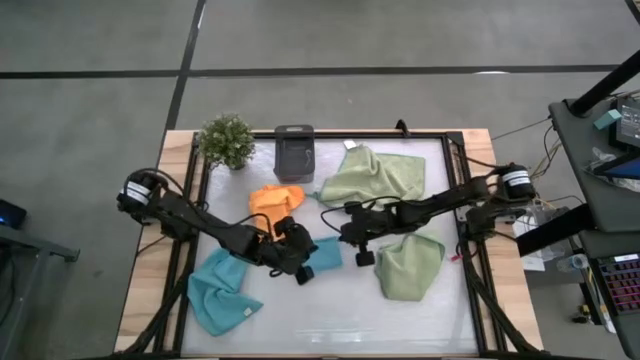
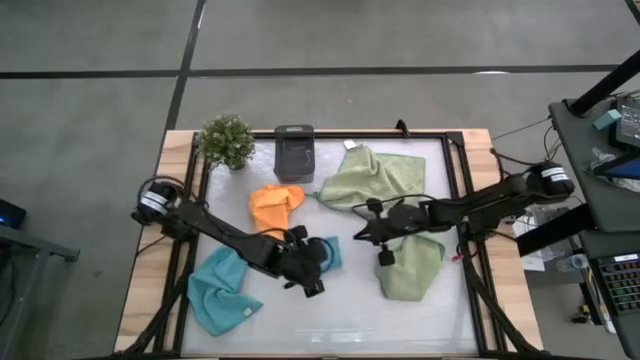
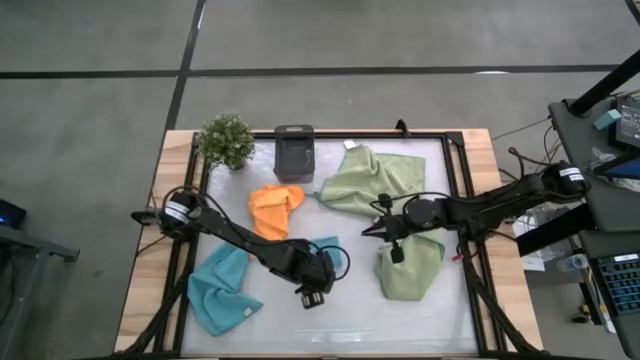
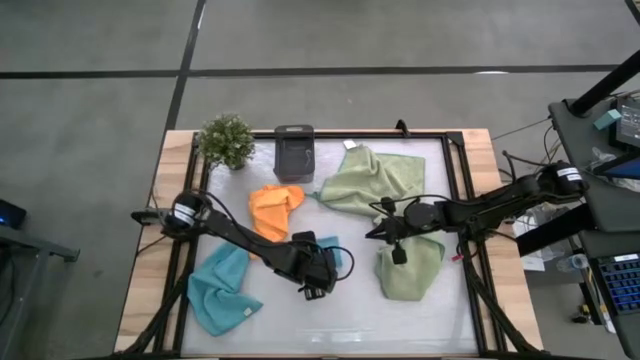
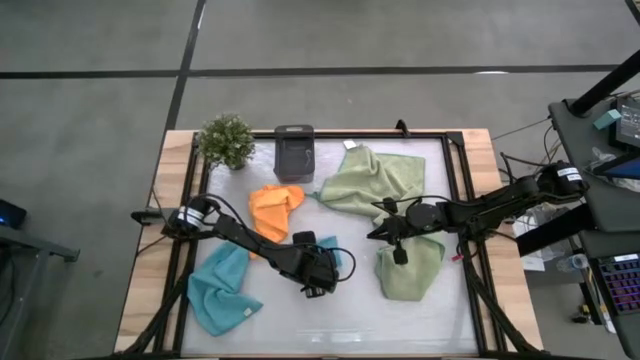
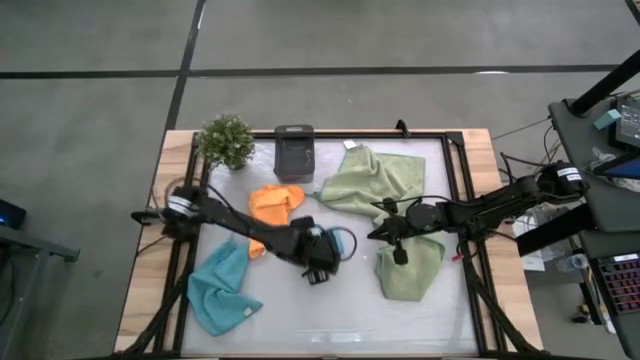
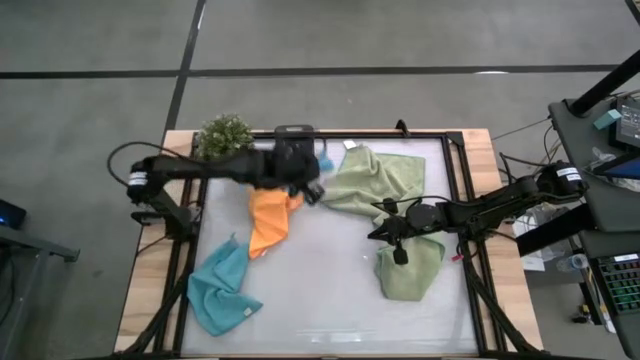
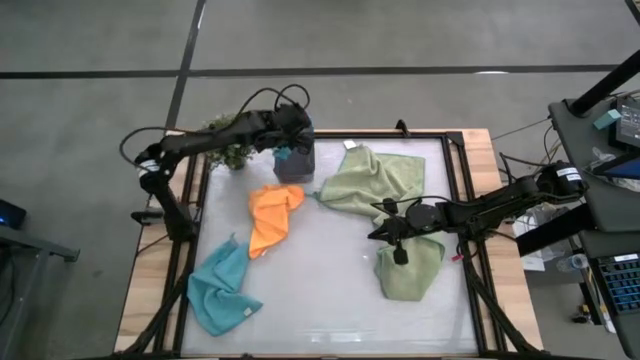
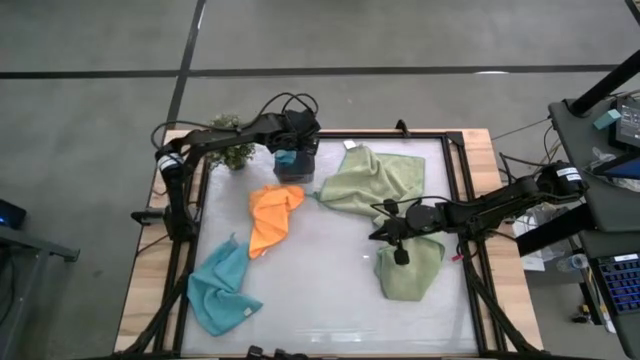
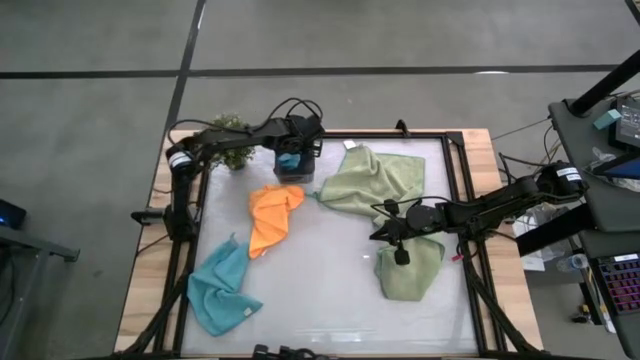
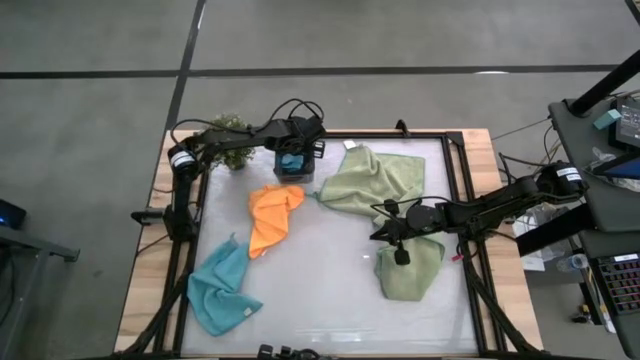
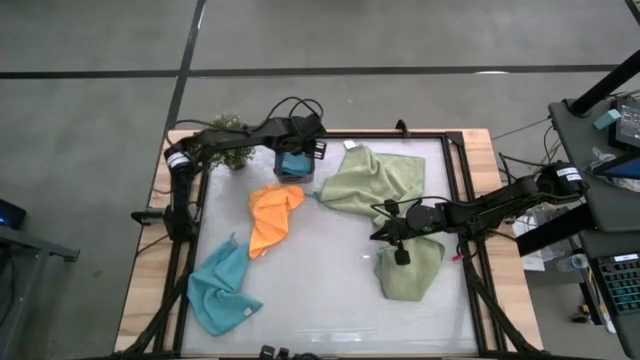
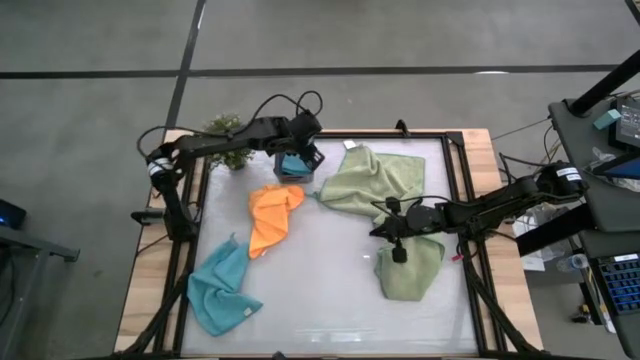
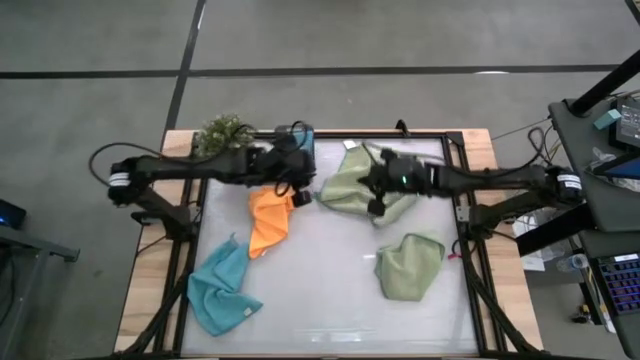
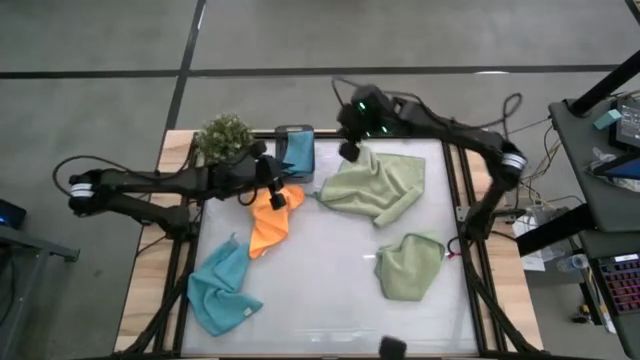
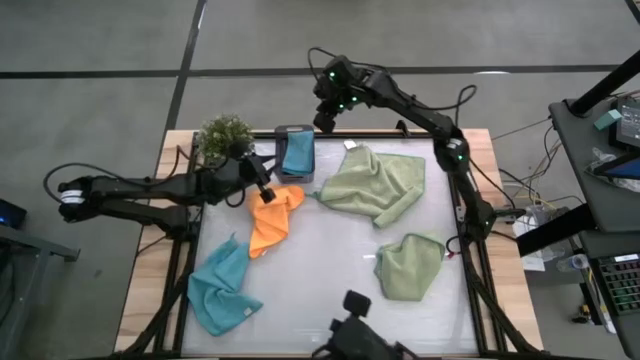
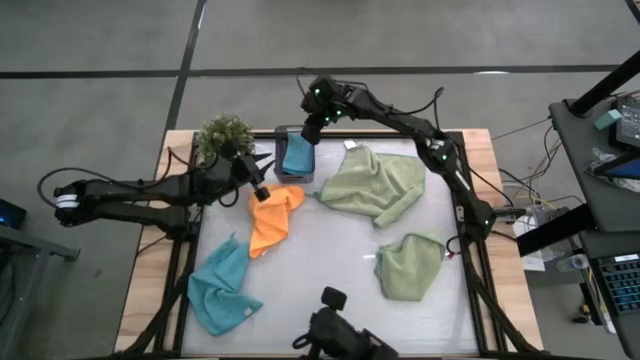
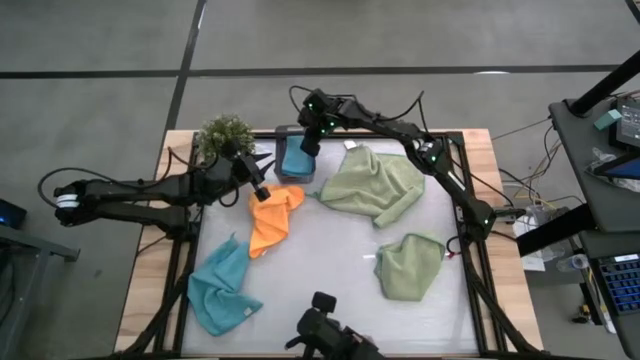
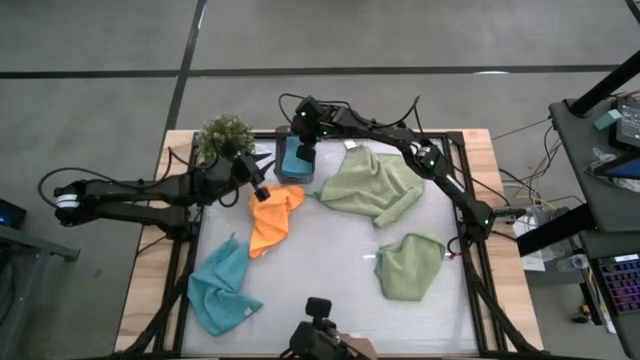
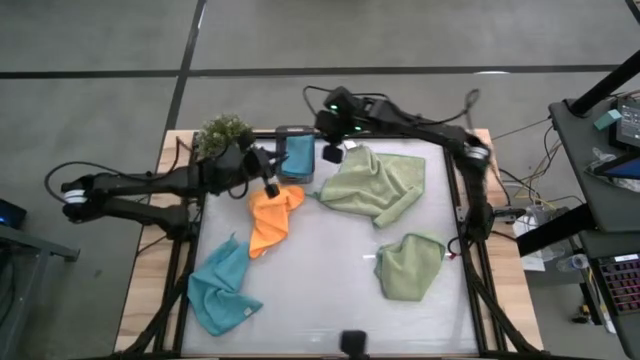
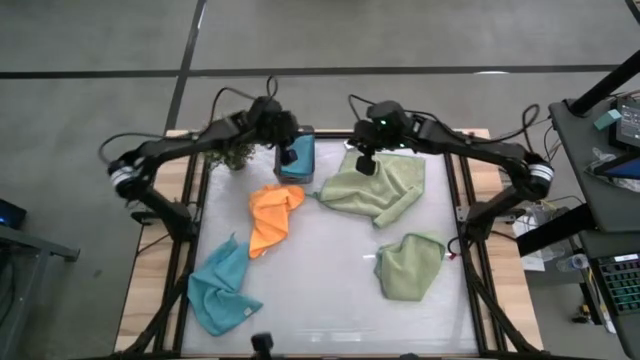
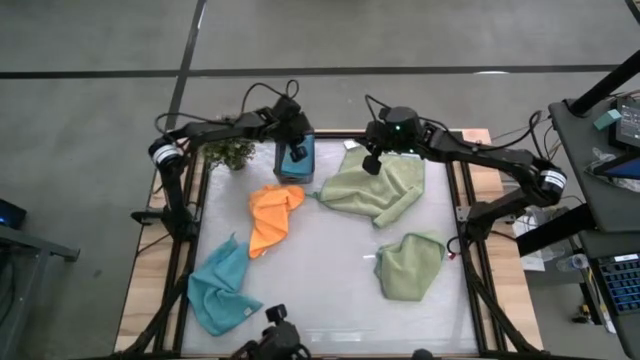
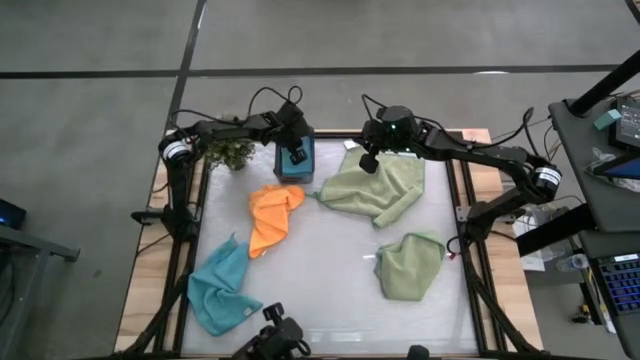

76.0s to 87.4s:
Task: Fold microfiber towels
Put the right blue folded towel into the bin
